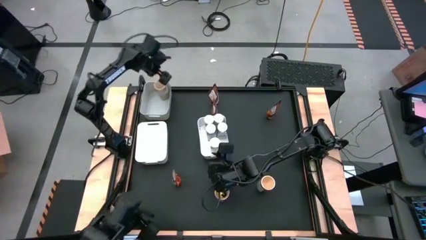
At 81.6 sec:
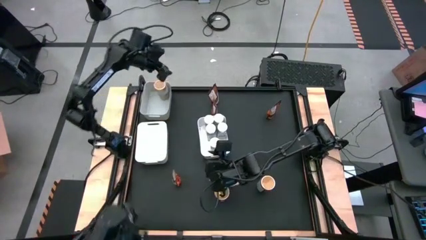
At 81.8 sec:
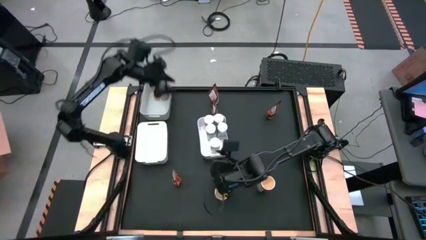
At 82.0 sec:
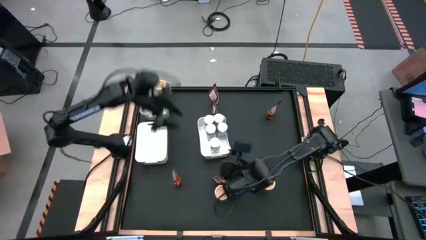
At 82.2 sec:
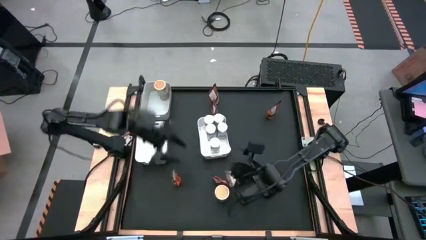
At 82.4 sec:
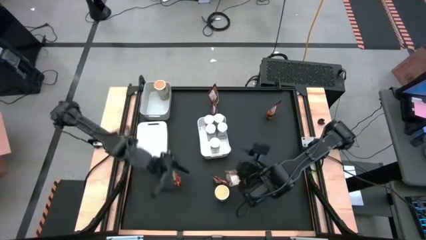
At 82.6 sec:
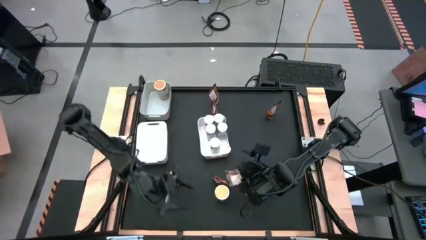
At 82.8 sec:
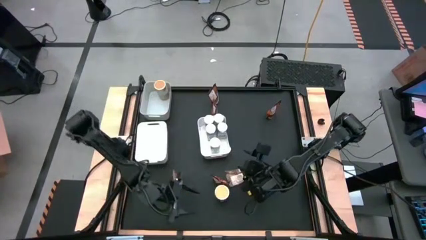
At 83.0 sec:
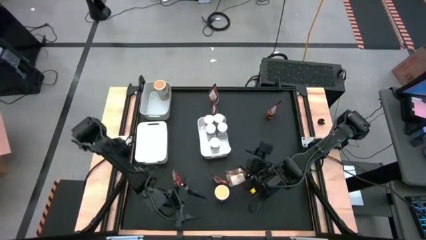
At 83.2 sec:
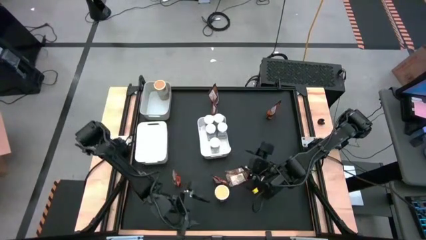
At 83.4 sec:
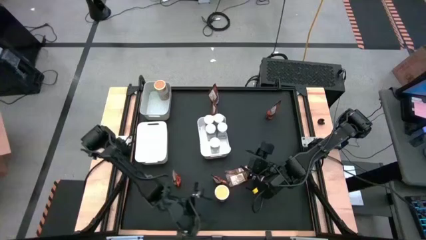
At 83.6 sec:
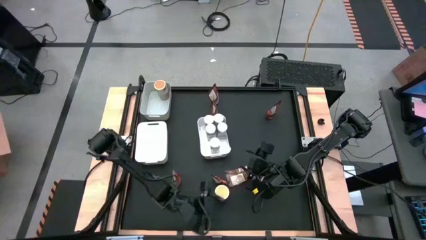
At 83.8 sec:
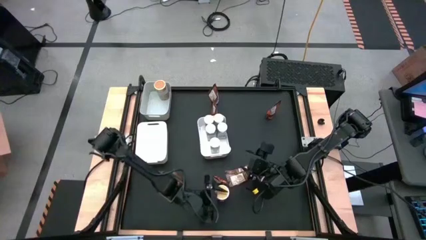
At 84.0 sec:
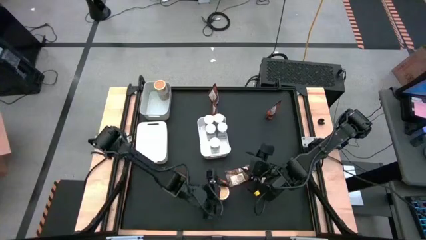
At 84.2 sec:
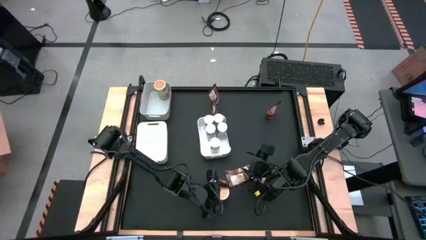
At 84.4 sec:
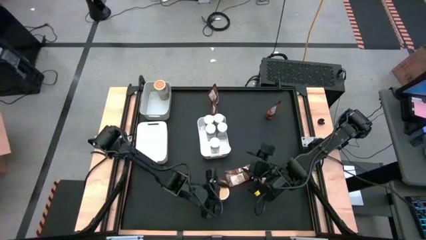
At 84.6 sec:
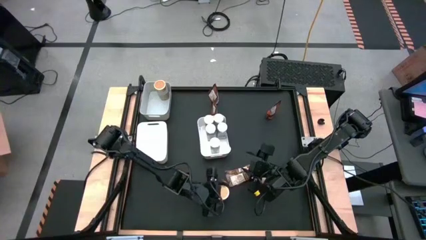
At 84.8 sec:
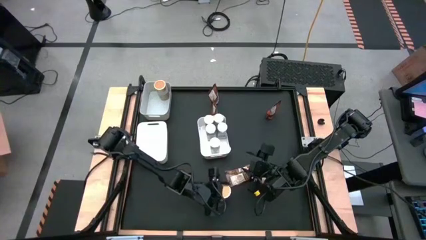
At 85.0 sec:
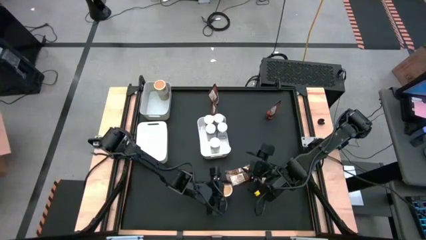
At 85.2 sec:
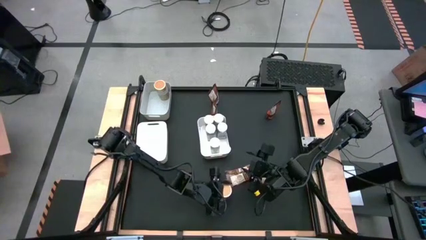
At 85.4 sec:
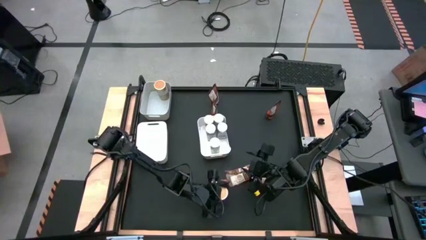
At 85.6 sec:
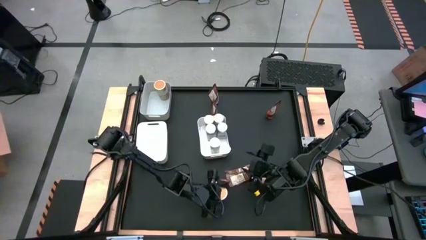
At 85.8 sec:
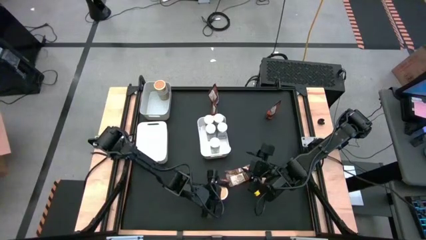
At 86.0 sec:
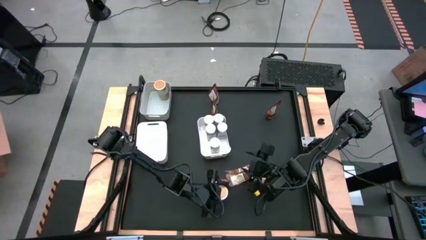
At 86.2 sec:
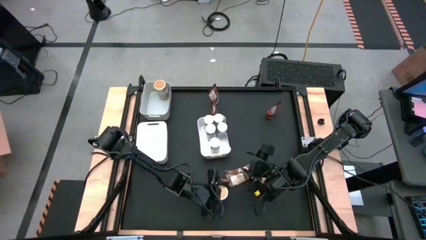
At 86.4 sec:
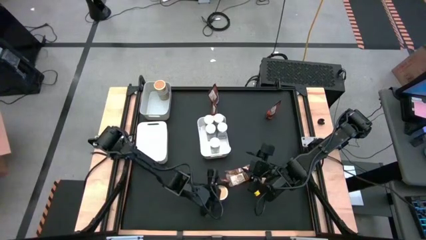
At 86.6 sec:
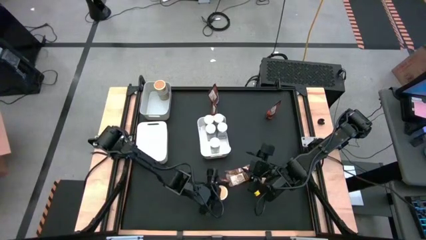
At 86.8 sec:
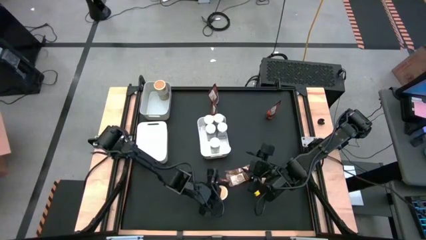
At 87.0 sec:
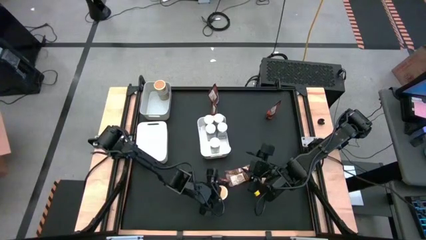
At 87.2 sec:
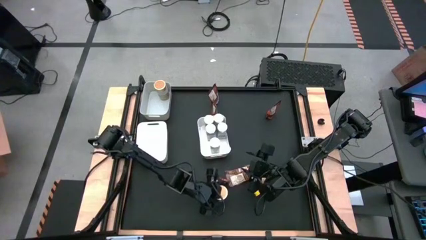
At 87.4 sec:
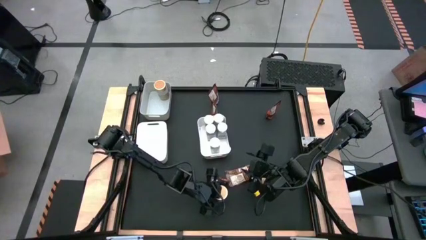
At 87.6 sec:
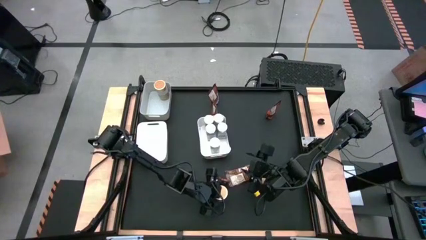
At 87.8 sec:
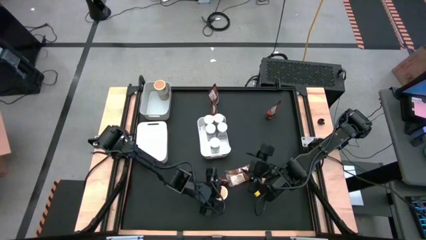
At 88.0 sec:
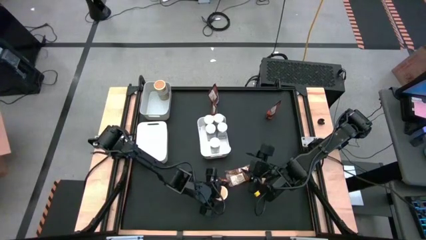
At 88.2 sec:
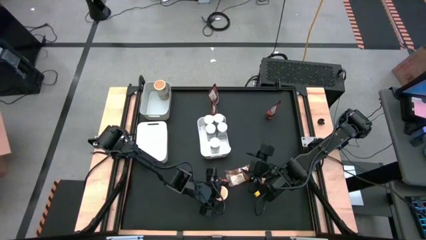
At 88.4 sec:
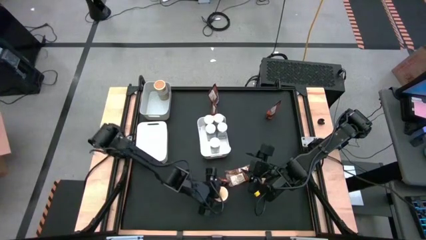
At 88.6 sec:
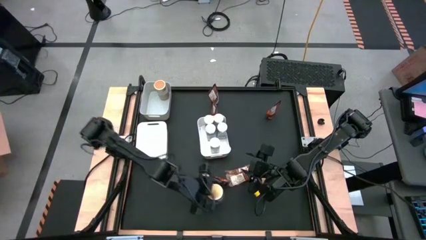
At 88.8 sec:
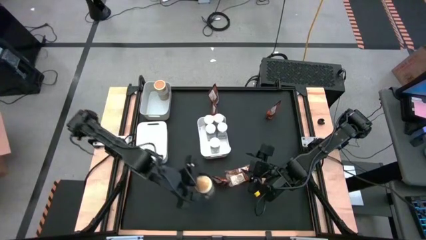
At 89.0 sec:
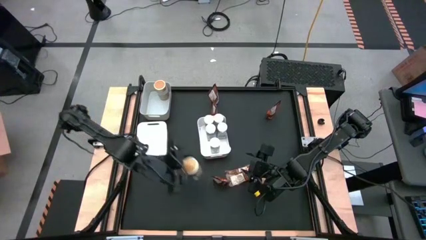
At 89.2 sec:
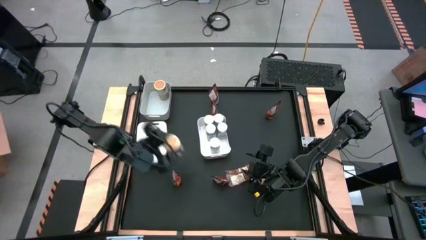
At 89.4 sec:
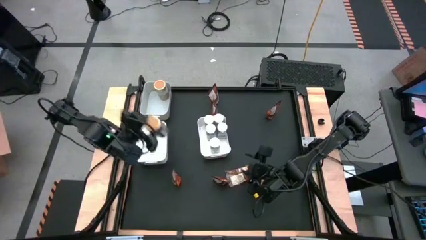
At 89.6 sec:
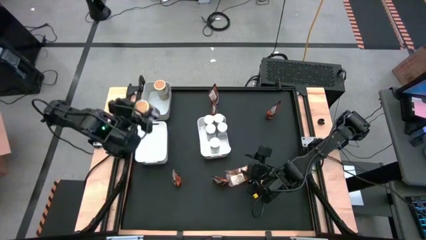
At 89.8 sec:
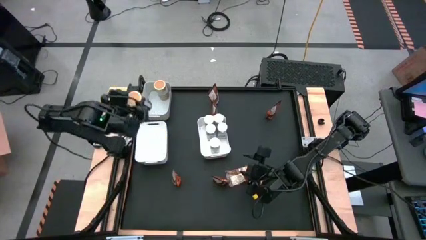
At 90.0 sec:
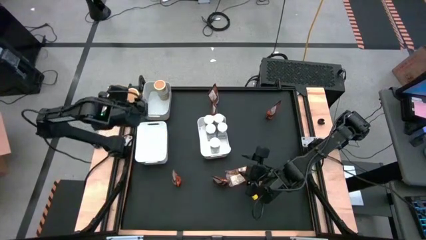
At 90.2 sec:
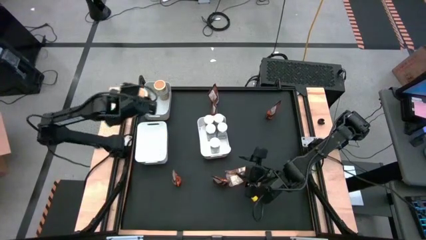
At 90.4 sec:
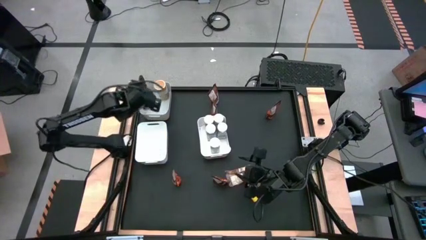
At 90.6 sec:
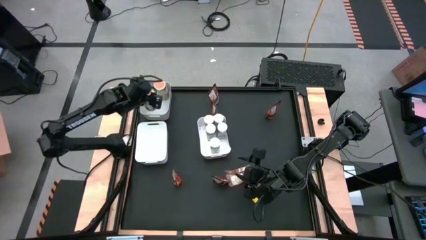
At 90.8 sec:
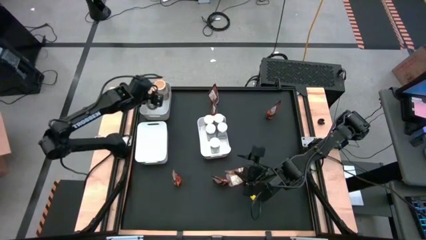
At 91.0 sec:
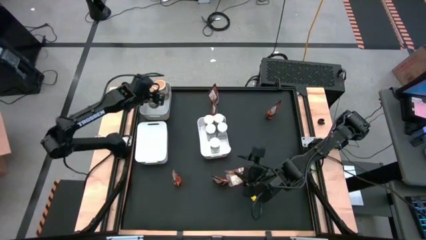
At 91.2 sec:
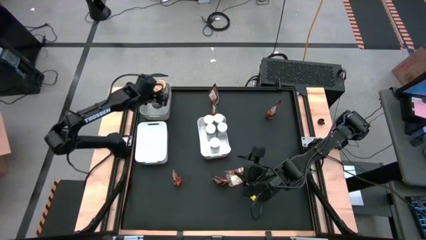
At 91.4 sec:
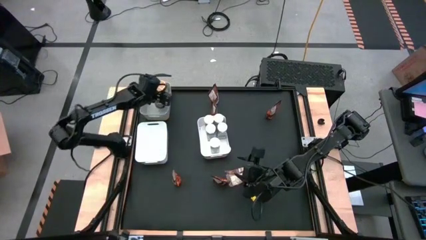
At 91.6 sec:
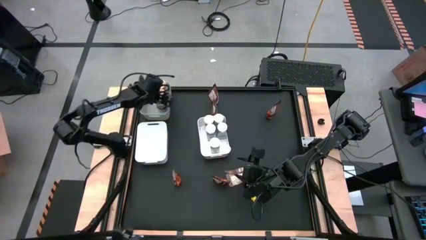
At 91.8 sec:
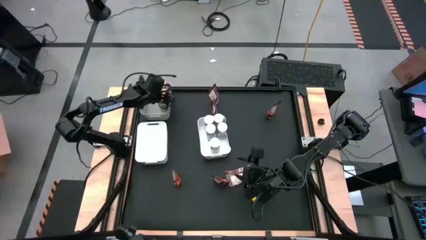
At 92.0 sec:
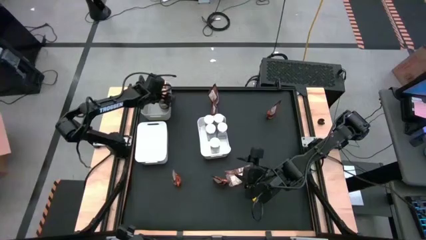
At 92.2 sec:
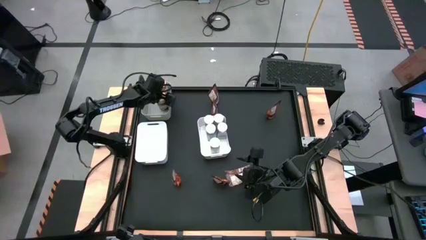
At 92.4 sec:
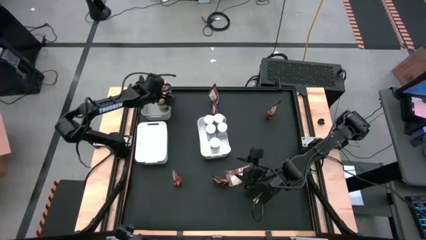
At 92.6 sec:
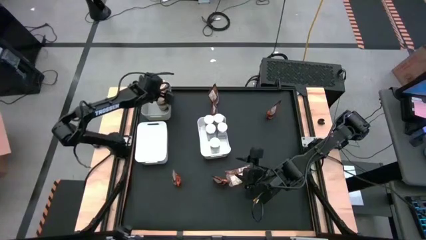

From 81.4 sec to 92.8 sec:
Task: Sort spices by type
Put the gold seasoning bottle into the gray bin
